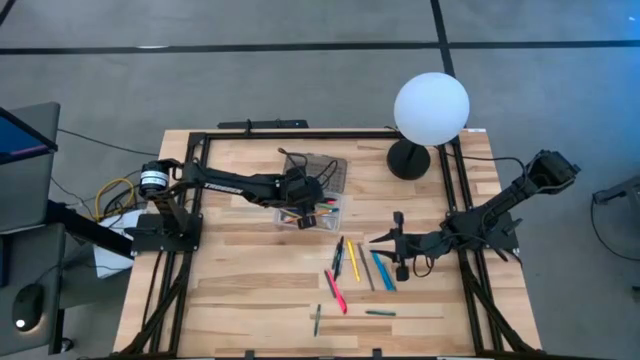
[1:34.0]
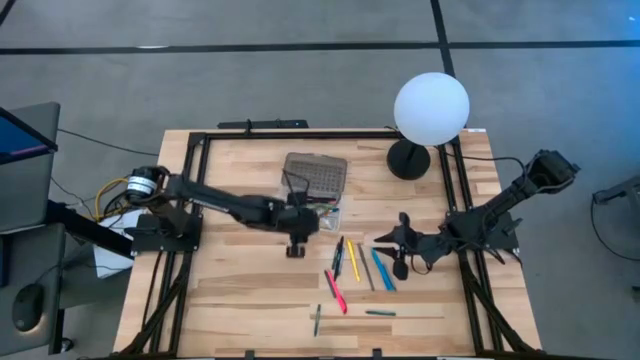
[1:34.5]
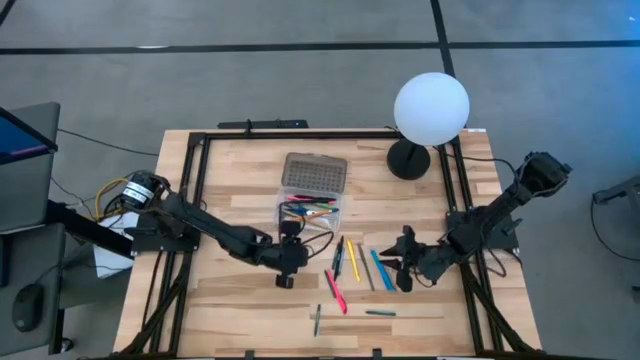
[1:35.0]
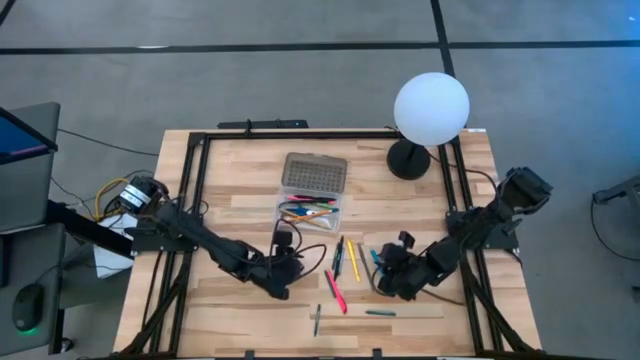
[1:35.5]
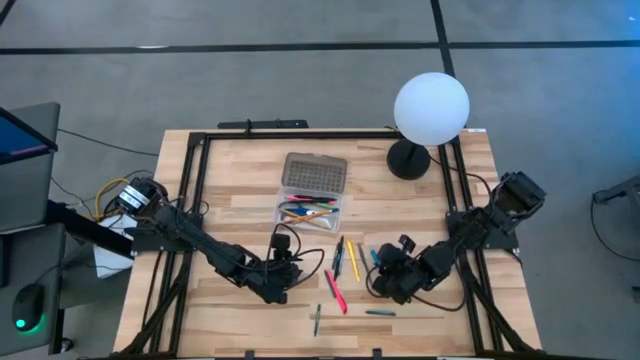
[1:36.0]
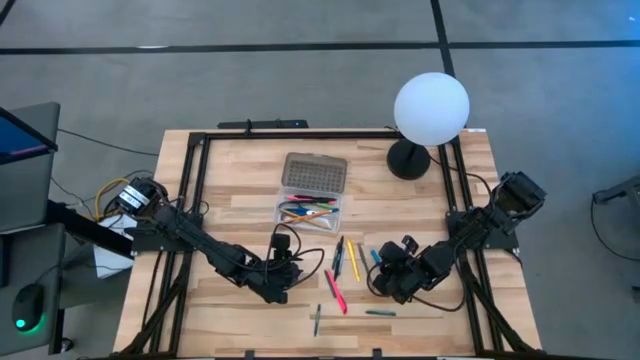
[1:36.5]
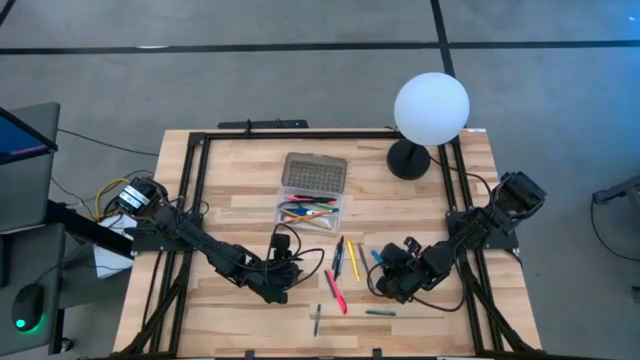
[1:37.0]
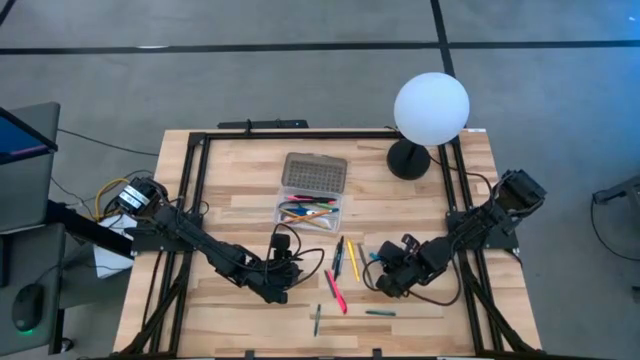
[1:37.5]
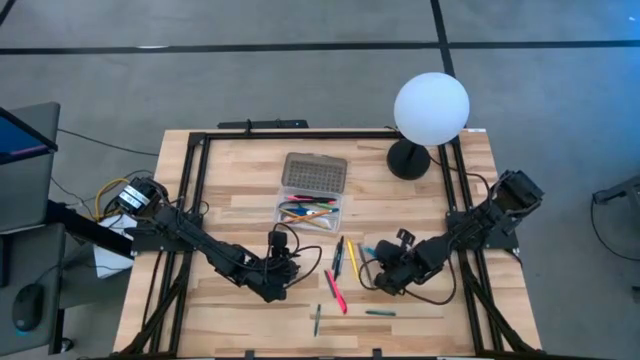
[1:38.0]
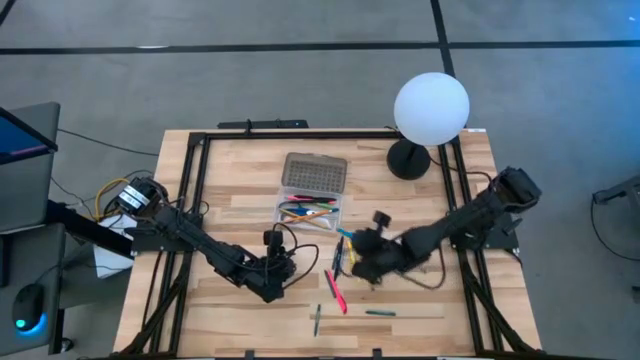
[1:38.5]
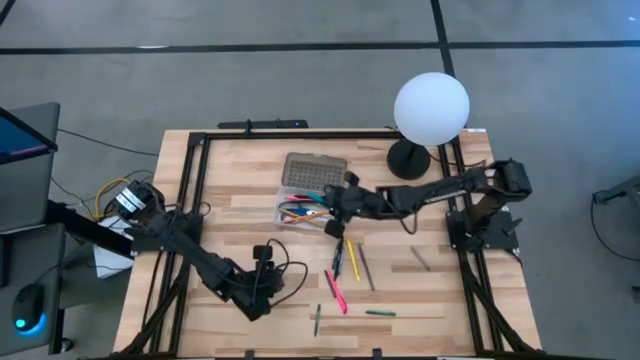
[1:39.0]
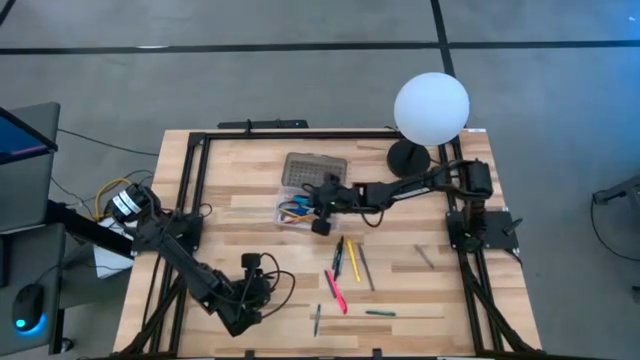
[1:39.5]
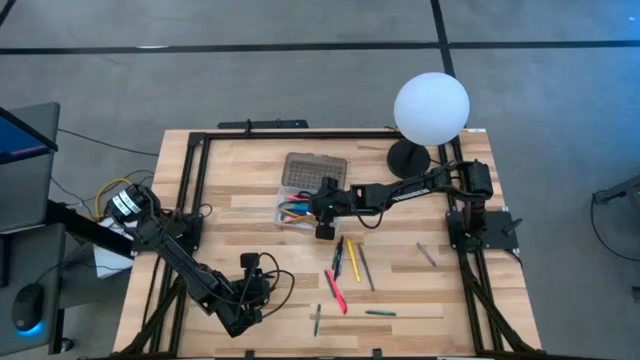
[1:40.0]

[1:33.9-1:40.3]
Task: Pick & place school supplies into a supply box
Put the blue pen into the gray supply box

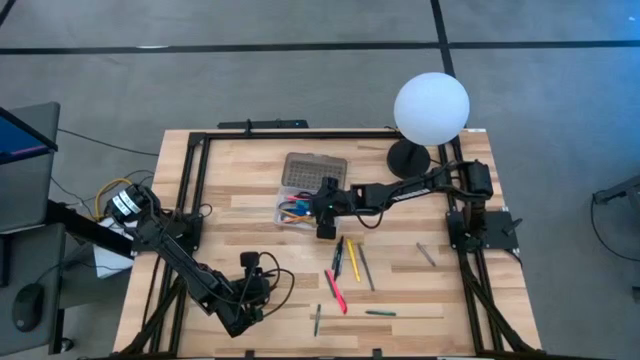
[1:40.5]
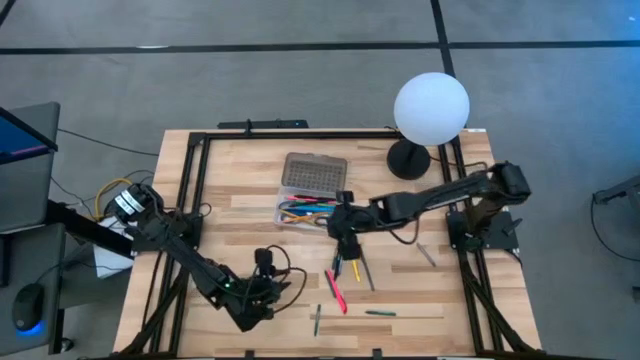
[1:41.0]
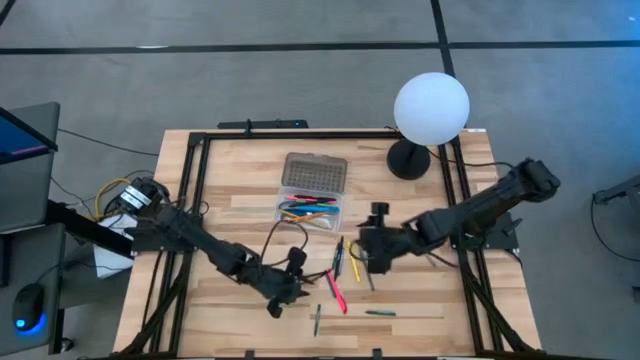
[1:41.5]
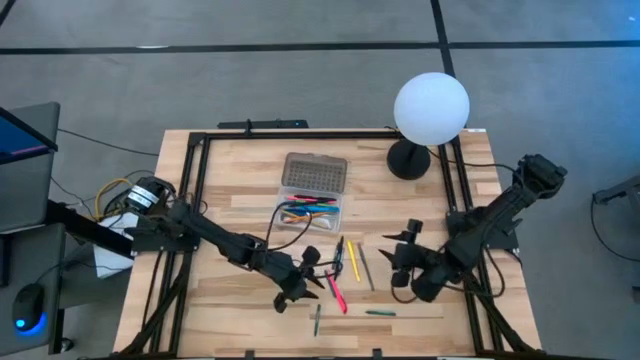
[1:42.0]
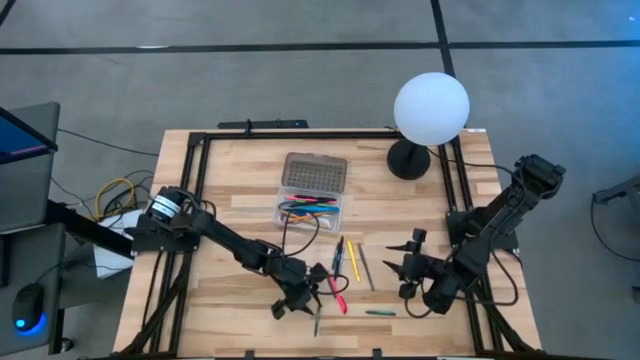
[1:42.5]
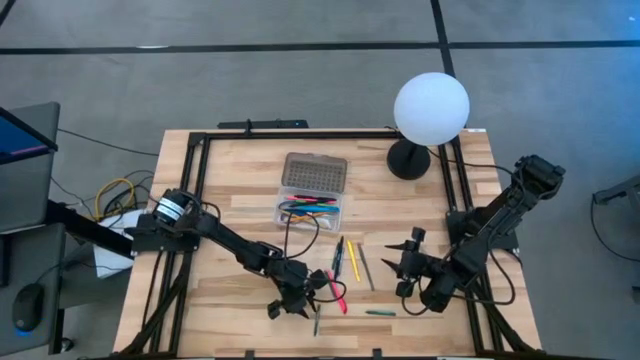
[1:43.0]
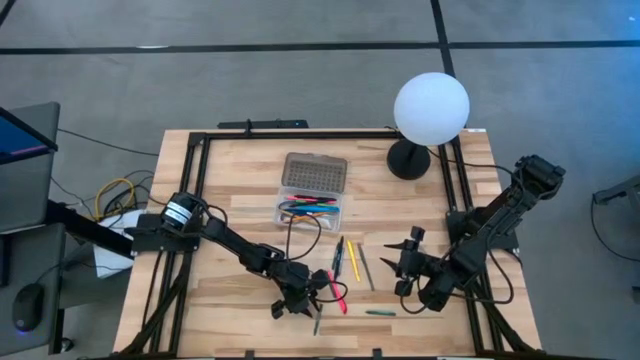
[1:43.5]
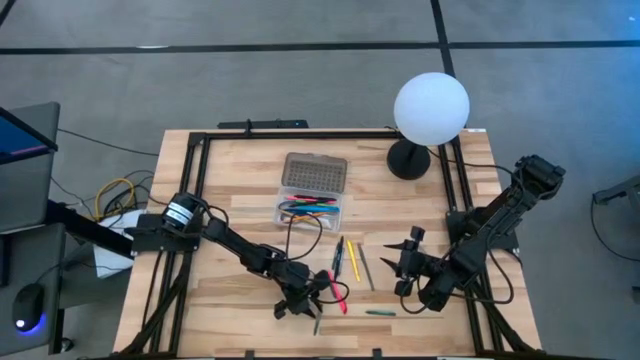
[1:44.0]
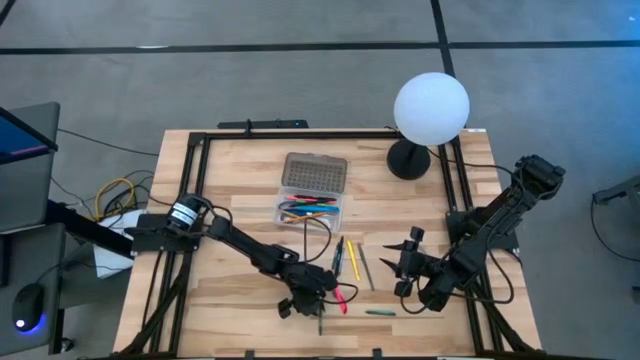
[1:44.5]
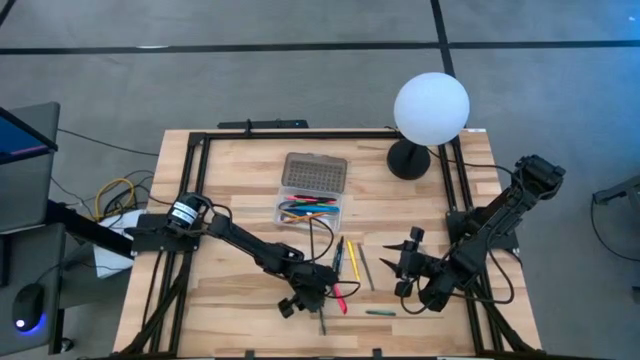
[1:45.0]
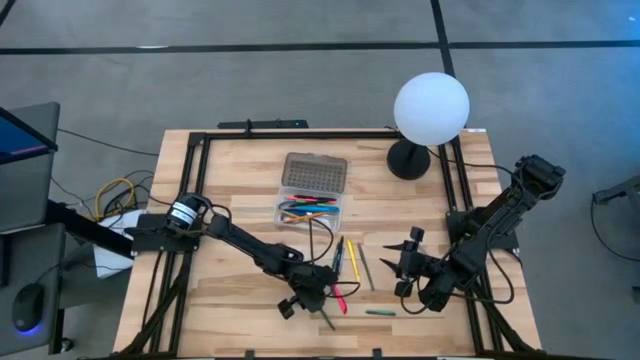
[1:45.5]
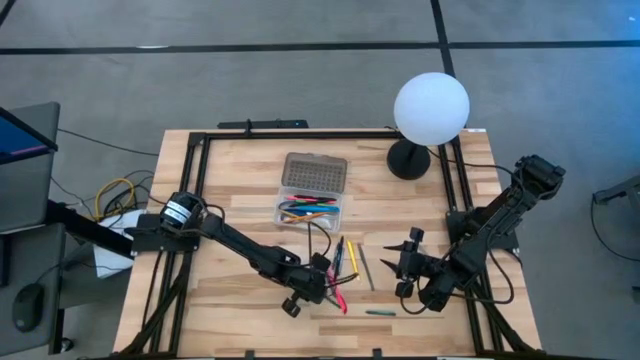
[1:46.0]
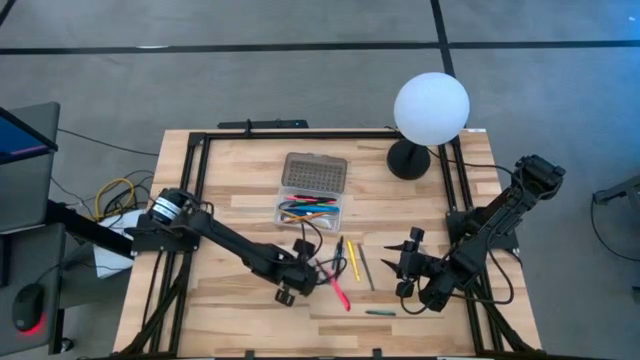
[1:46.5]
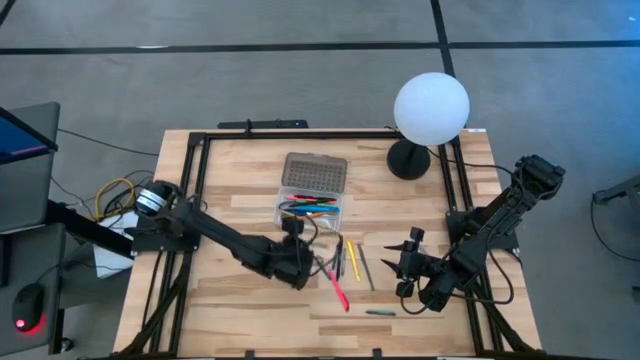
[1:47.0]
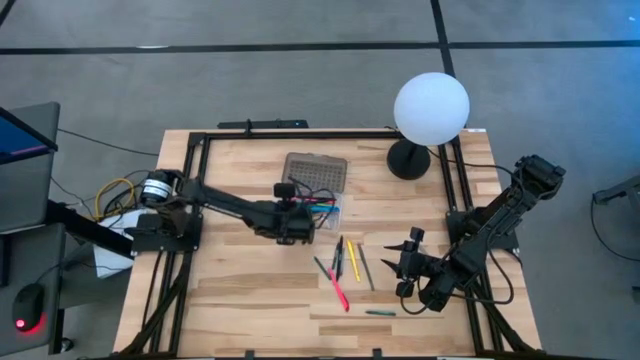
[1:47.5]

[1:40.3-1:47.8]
Put the green crayon into the gray supply box

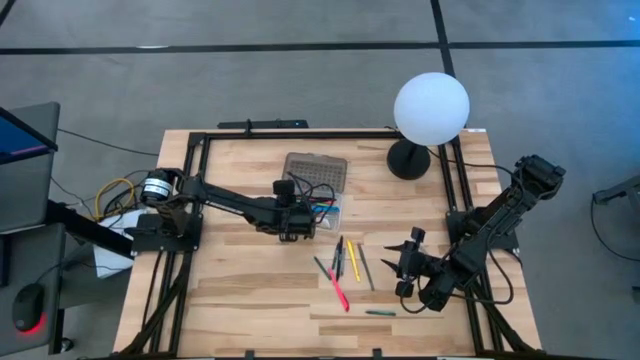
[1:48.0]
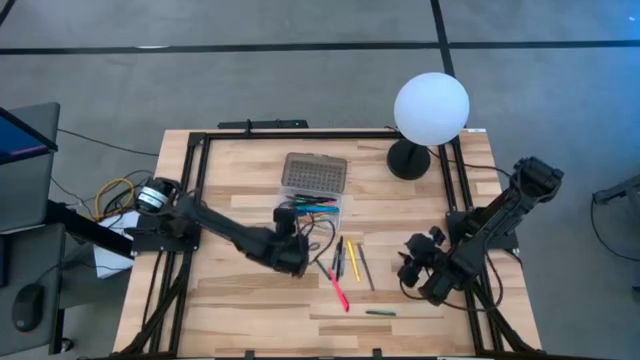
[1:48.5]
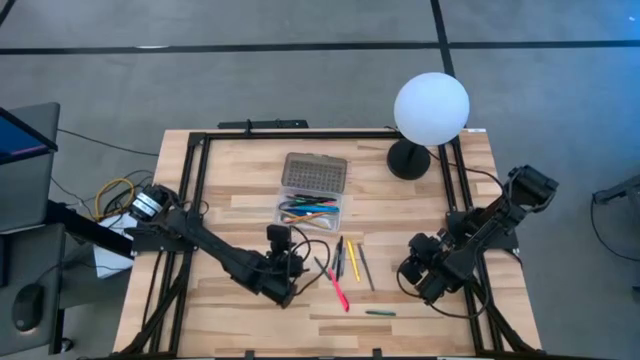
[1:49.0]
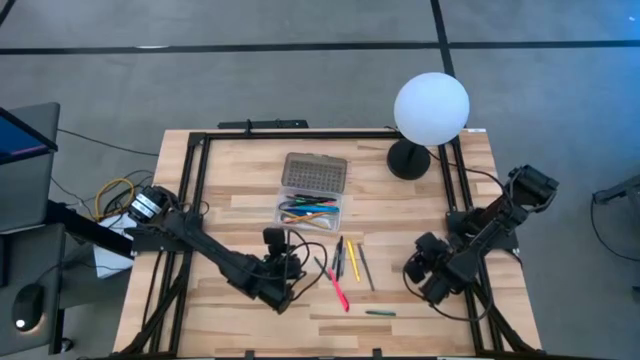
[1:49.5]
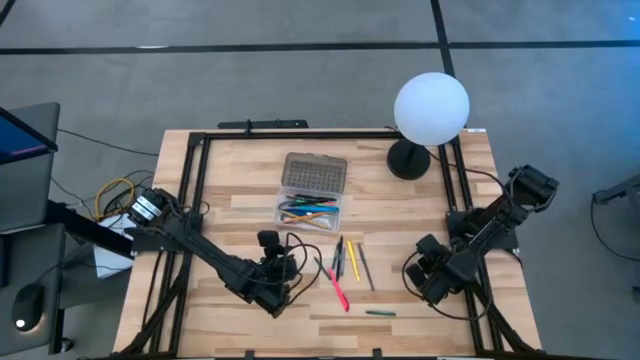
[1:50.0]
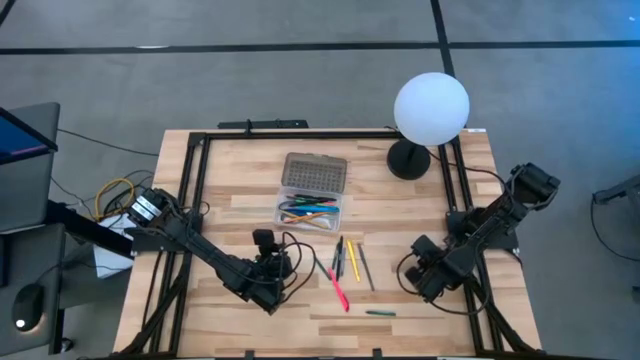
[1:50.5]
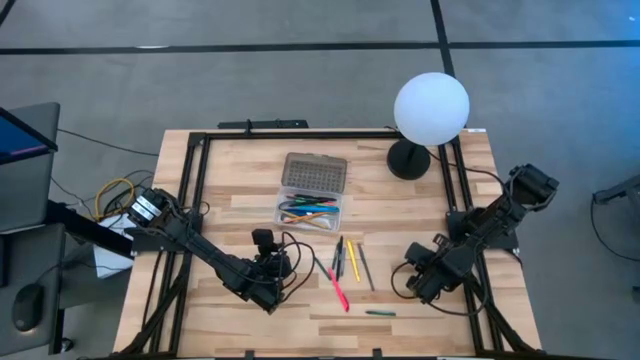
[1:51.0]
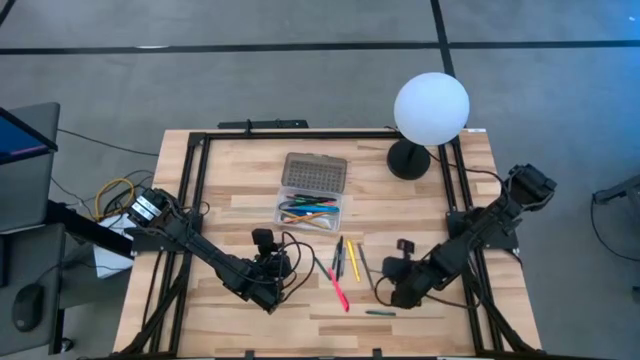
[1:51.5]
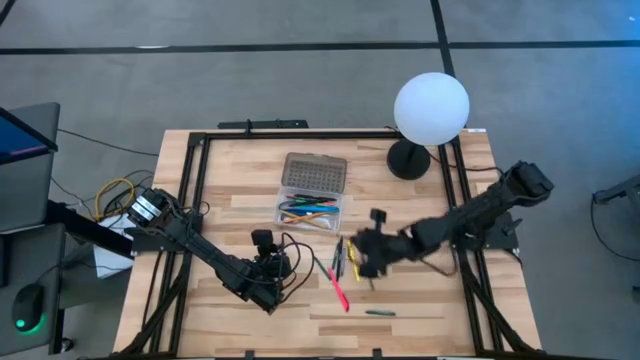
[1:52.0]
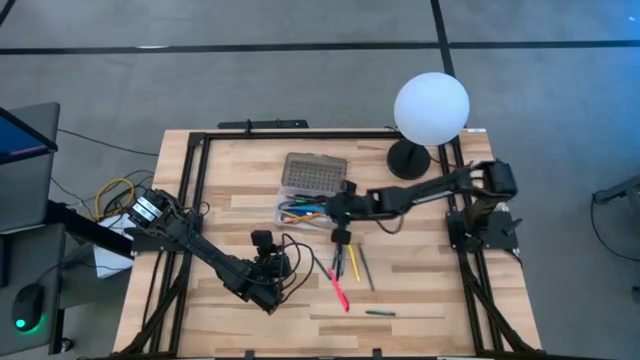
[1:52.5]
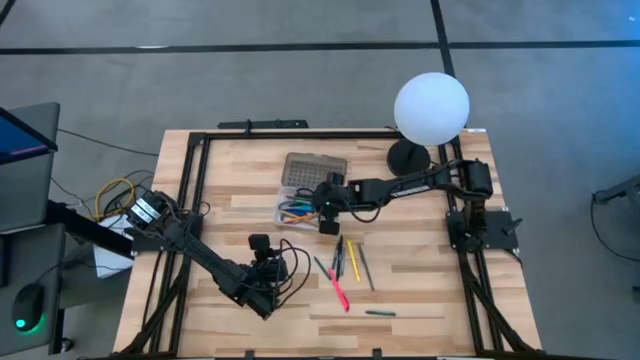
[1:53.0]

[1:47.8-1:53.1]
Put the gray crayon into the gray supply box

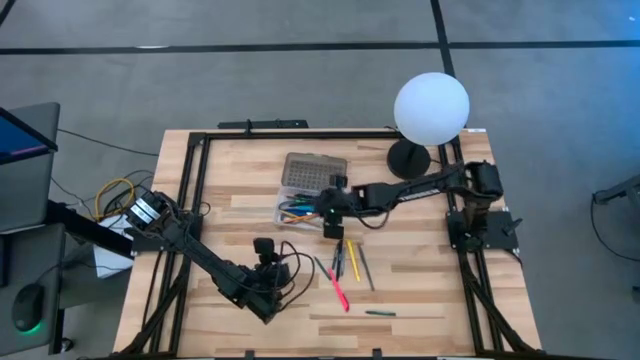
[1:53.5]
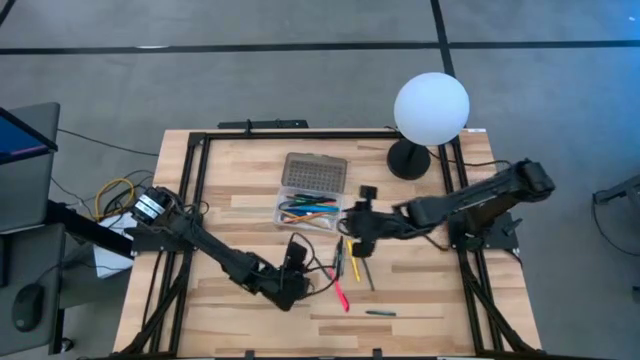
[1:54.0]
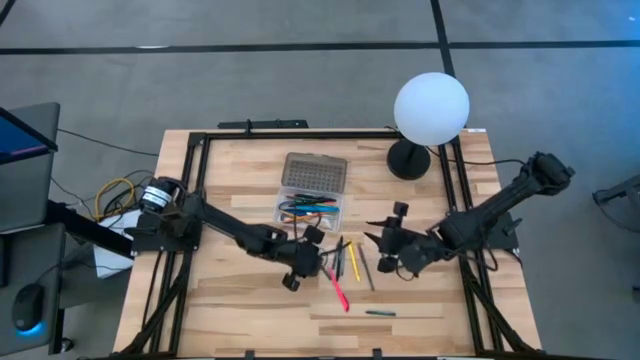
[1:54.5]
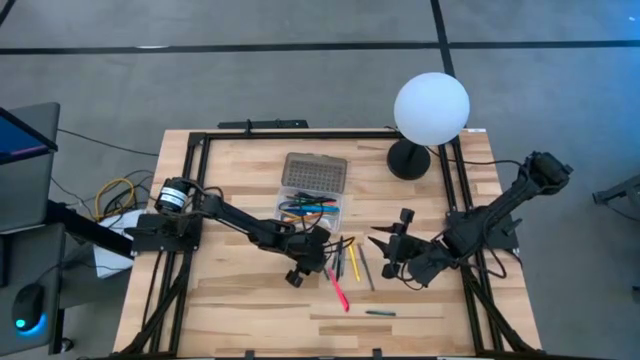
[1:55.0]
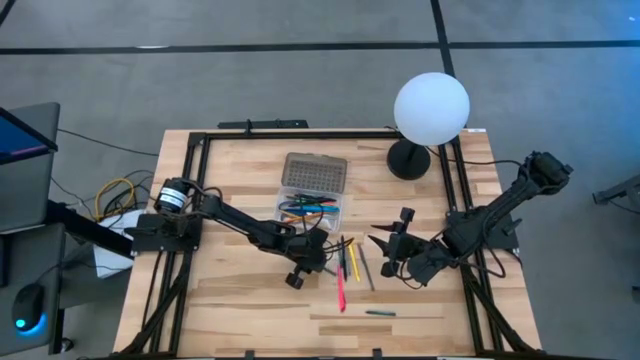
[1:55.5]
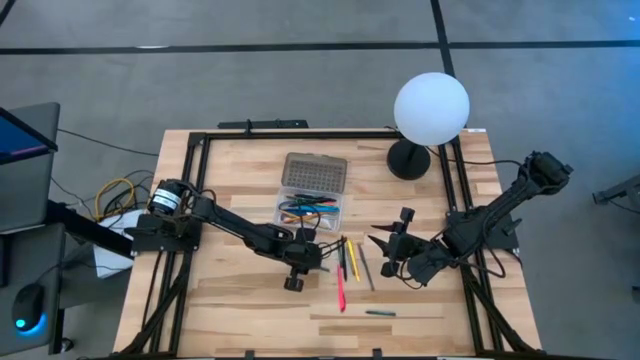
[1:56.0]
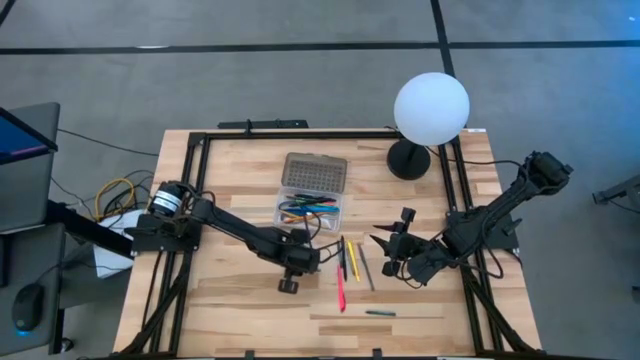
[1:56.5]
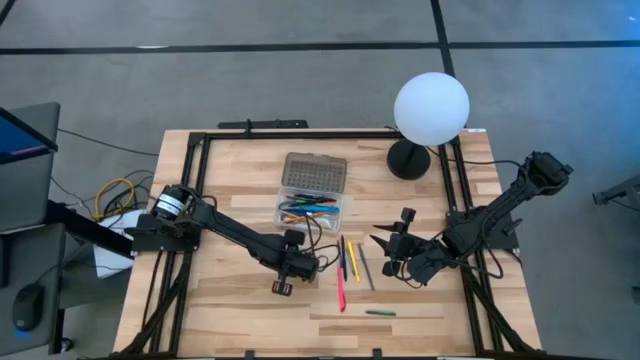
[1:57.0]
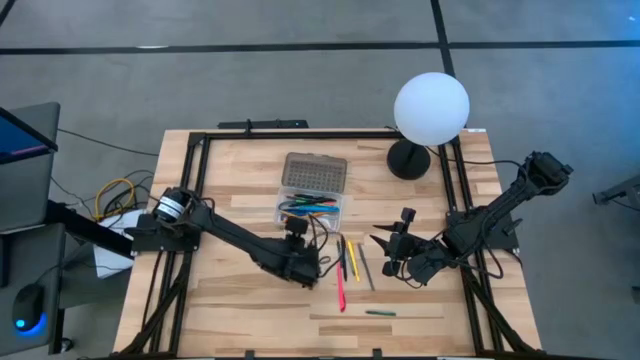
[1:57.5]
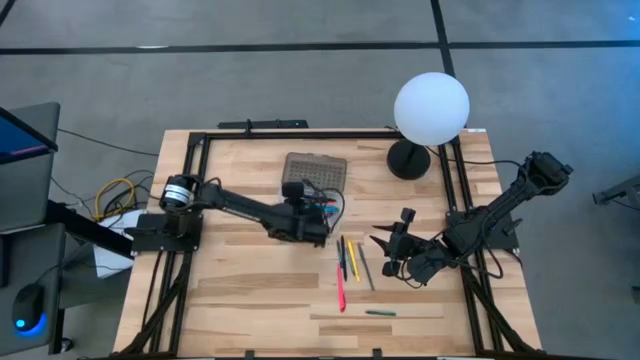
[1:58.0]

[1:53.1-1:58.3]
Put the green crayon into the gray supply box
